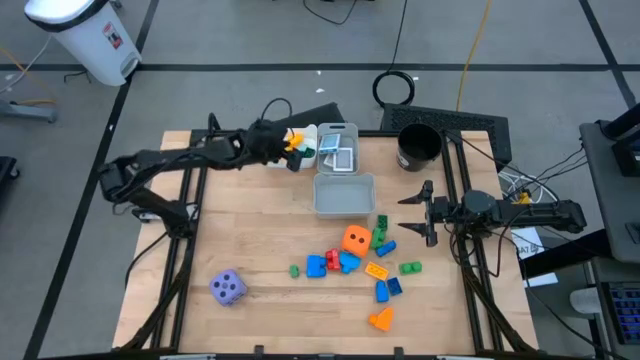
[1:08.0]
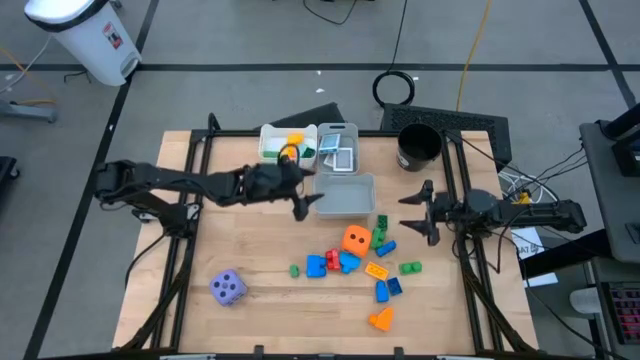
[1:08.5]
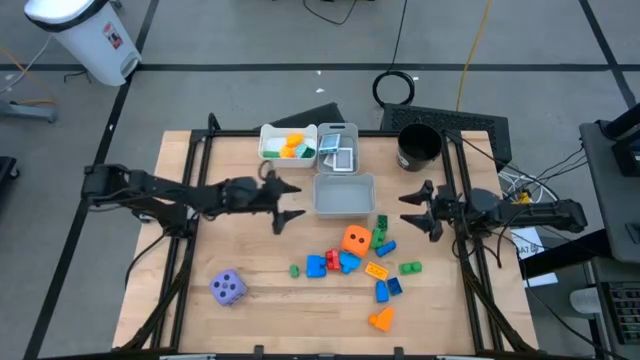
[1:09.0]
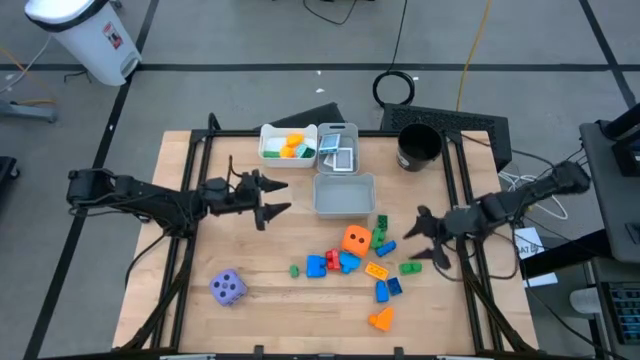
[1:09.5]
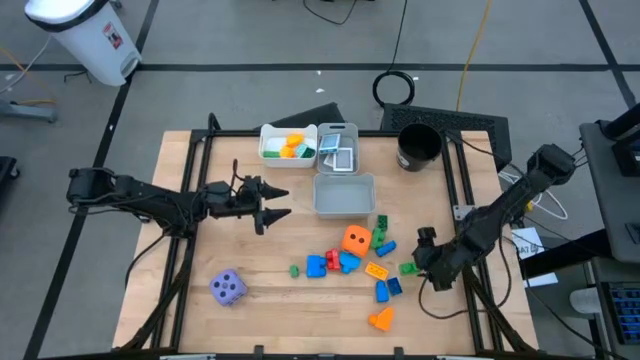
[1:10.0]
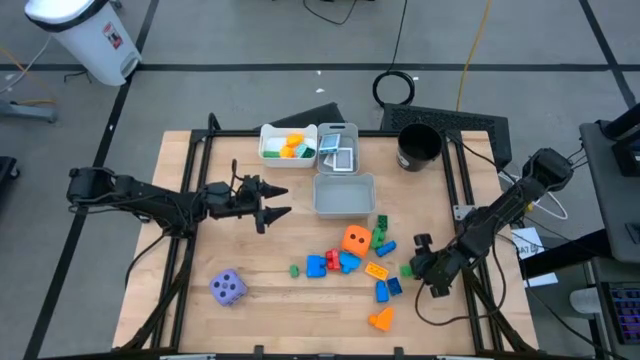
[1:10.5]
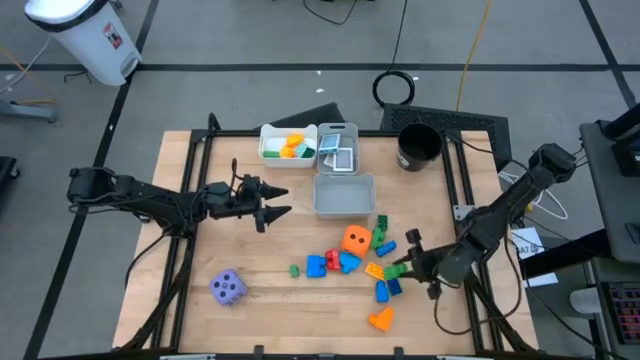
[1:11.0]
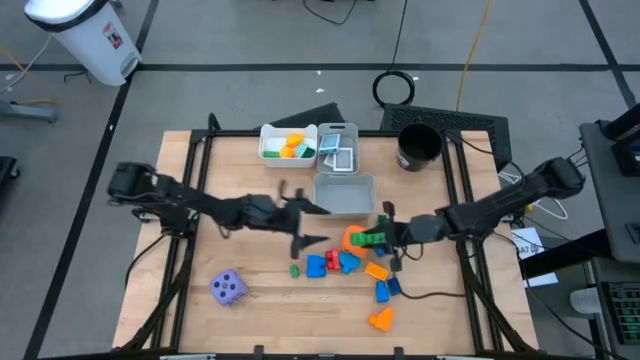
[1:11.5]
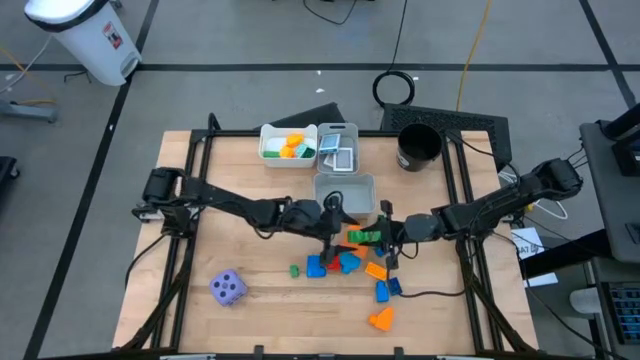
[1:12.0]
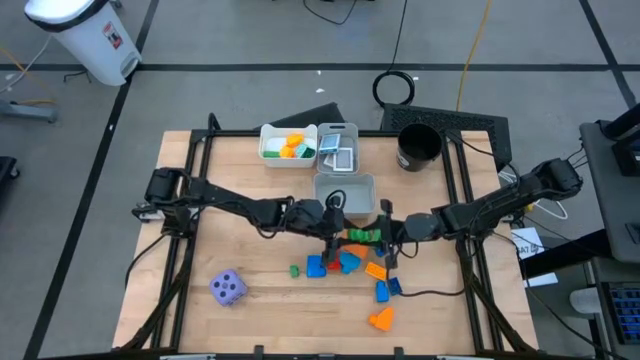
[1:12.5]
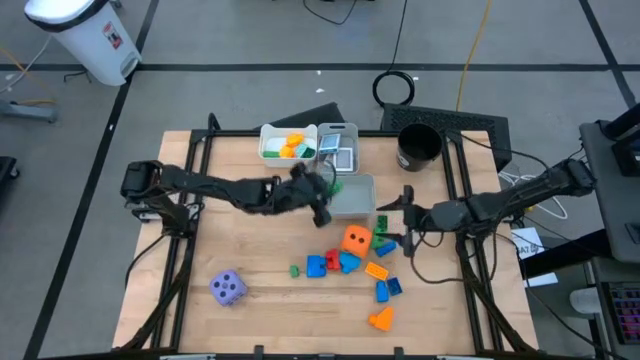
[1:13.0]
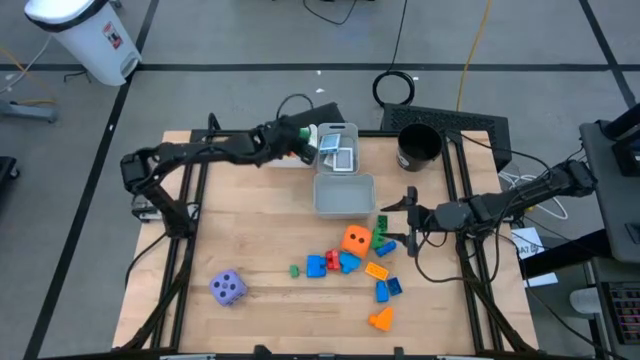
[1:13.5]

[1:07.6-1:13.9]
Task: Pick & Place Toys
Put the green game piece into the white bin

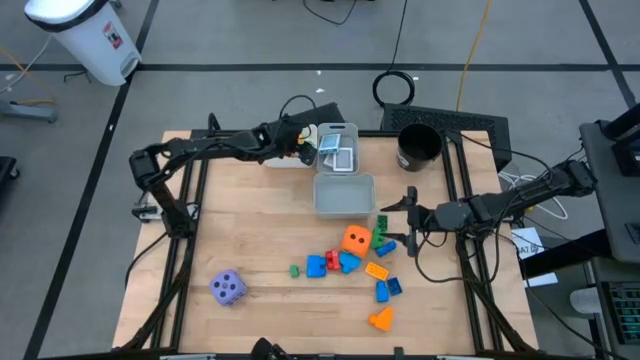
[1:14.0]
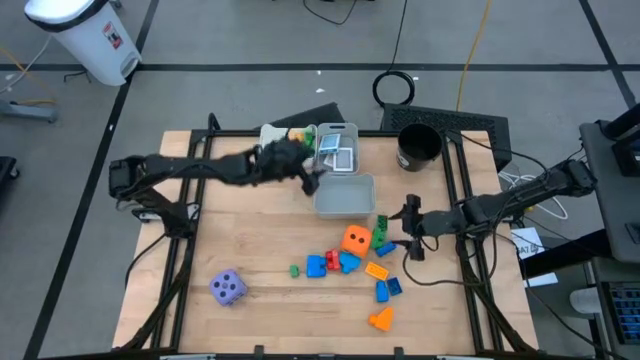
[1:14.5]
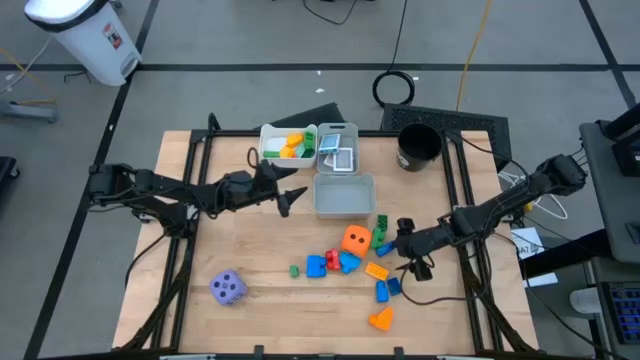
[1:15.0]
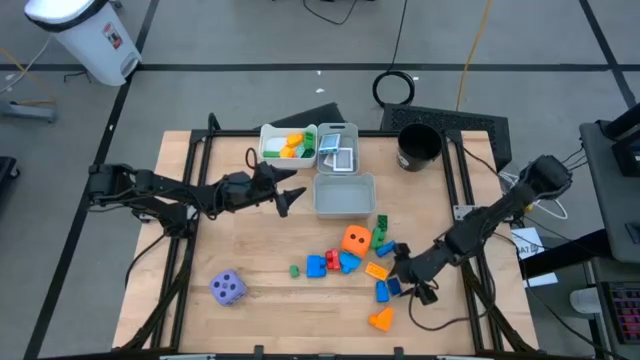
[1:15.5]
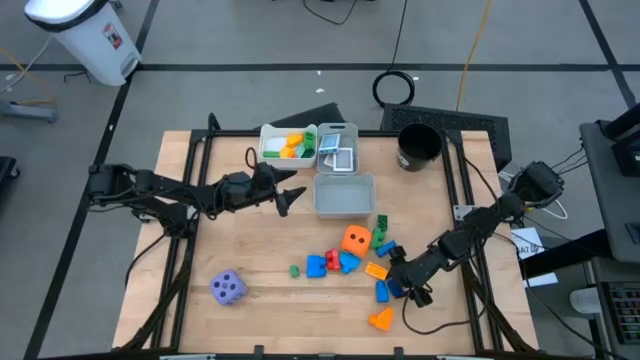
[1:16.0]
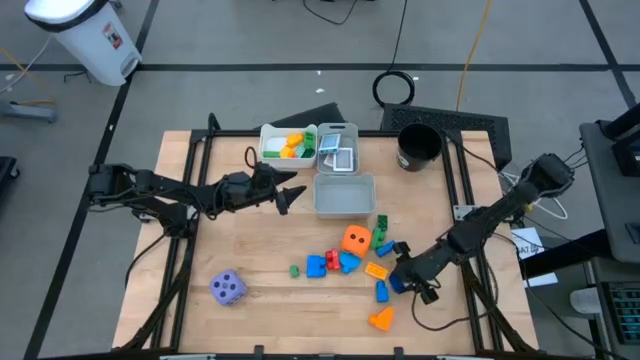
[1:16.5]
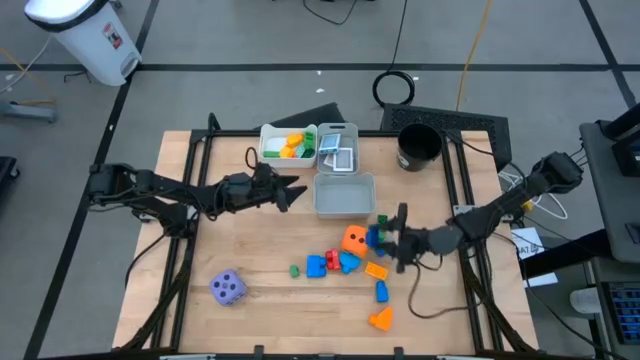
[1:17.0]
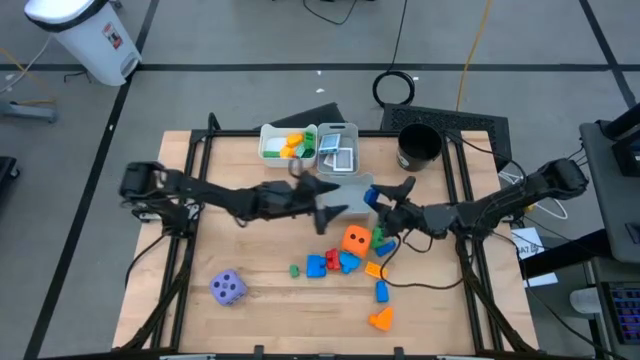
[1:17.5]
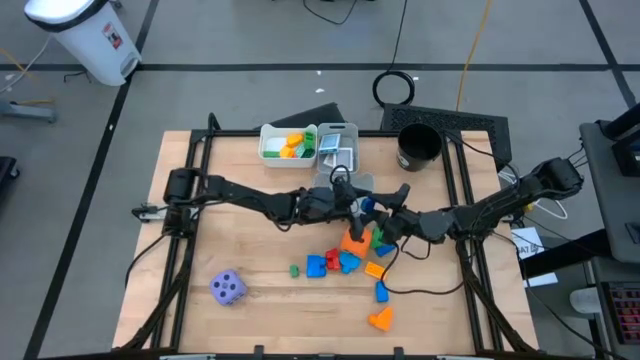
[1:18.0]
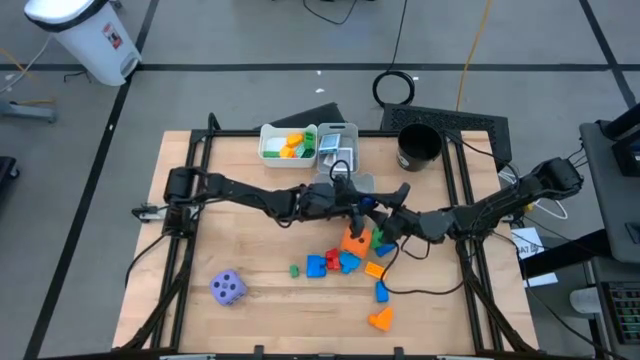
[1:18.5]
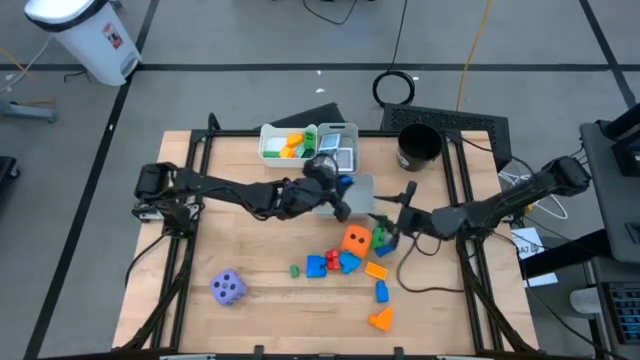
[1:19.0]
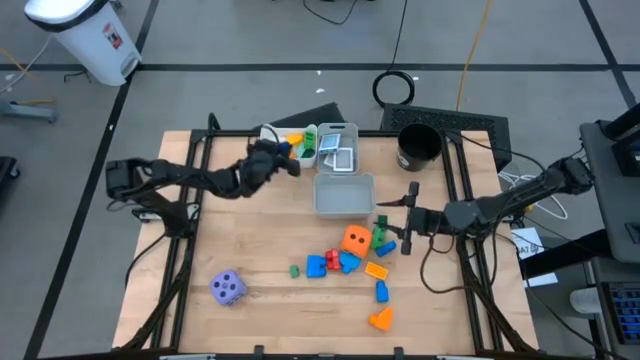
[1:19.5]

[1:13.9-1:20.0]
Put the blue game piece into the white bin

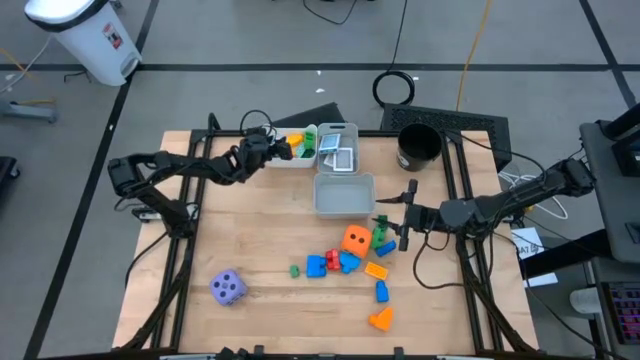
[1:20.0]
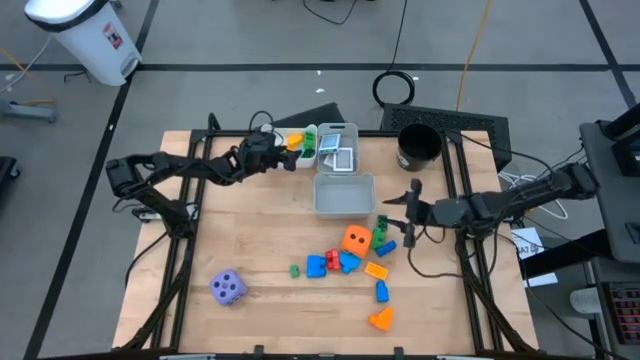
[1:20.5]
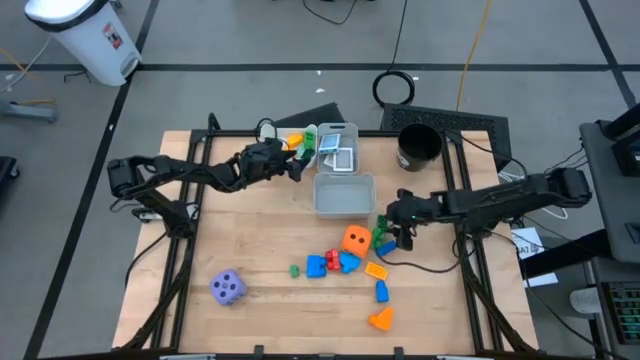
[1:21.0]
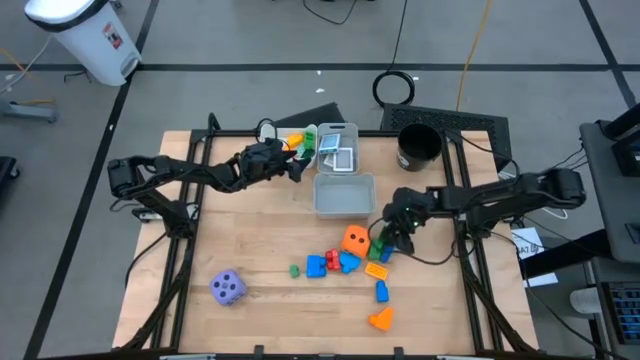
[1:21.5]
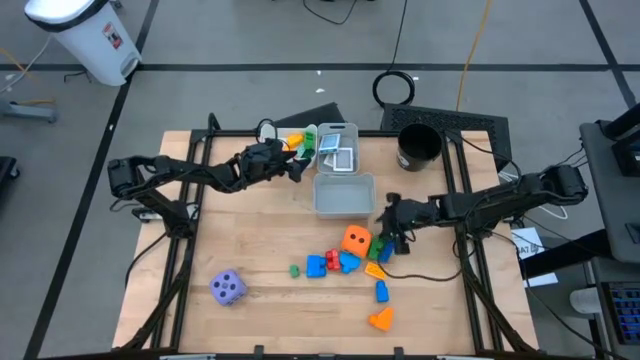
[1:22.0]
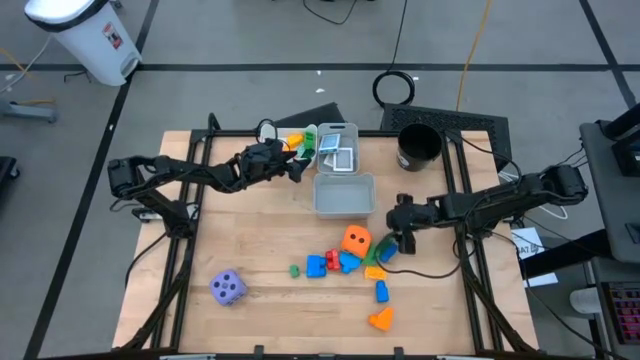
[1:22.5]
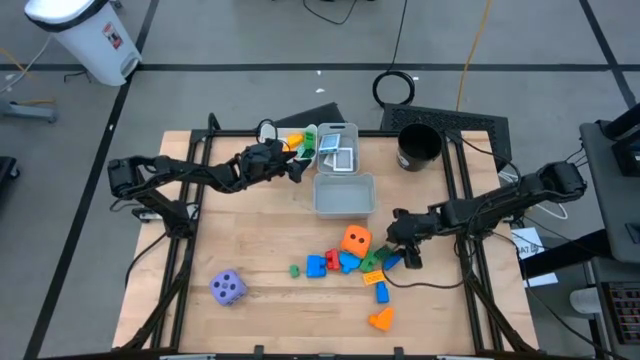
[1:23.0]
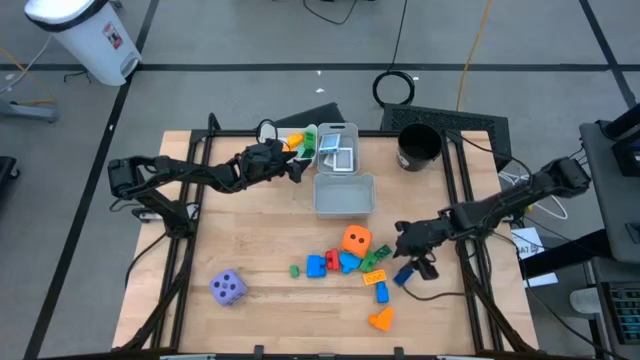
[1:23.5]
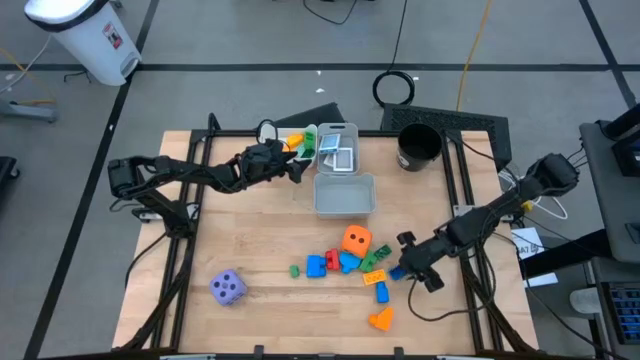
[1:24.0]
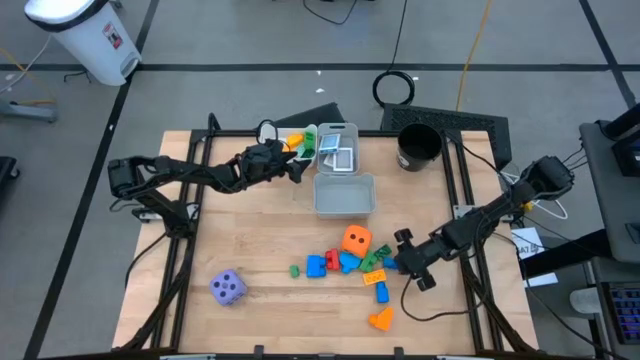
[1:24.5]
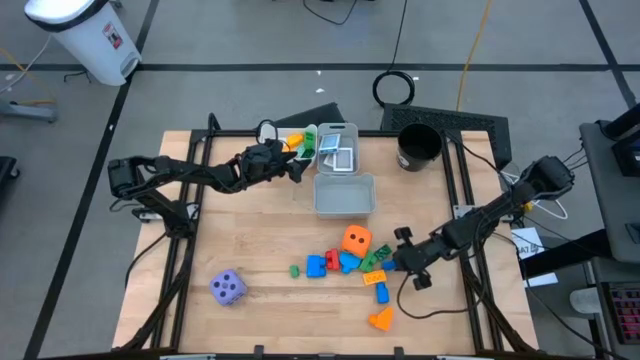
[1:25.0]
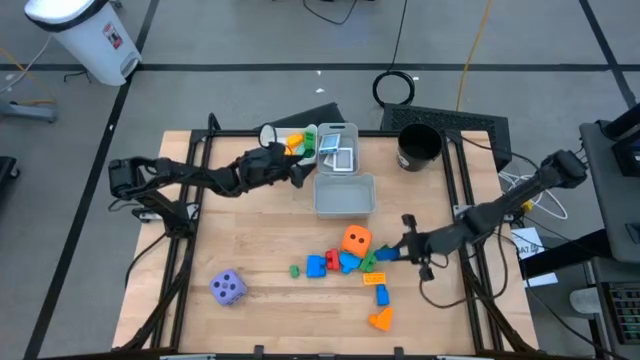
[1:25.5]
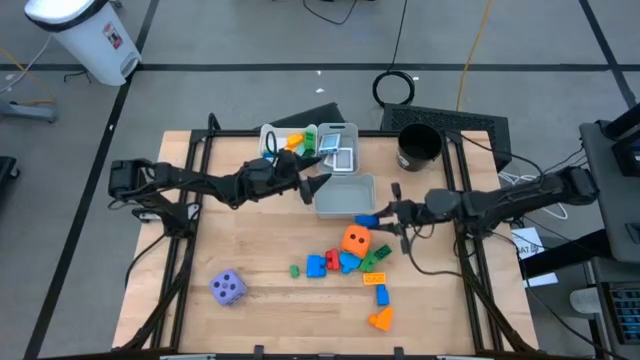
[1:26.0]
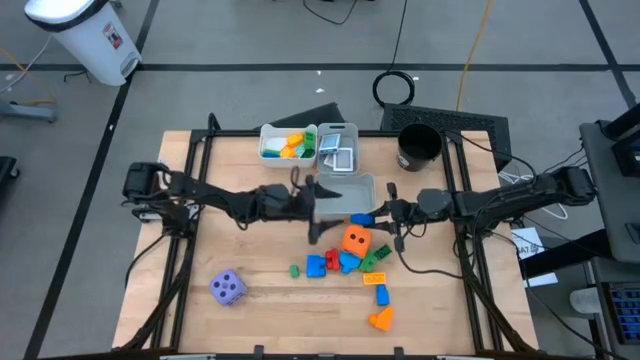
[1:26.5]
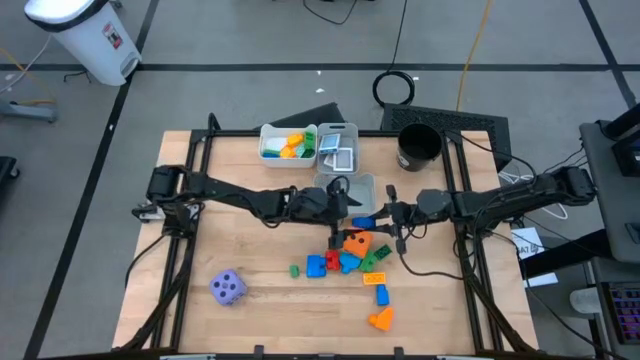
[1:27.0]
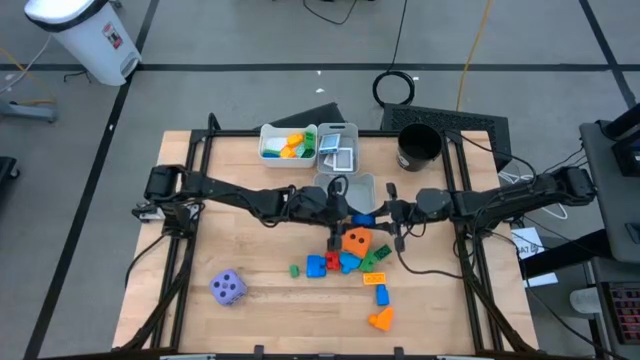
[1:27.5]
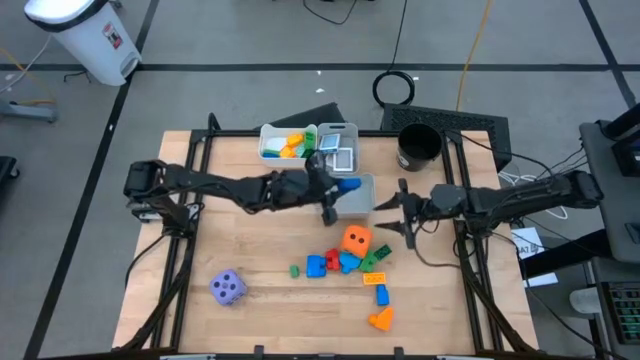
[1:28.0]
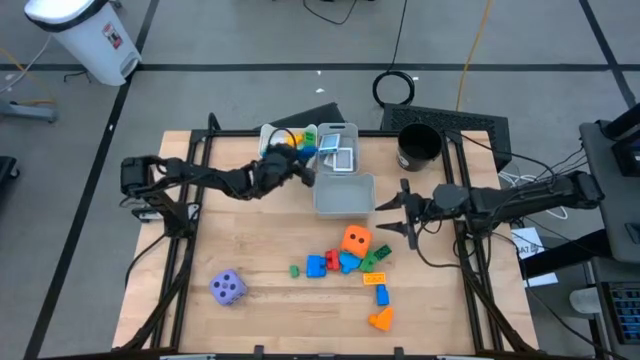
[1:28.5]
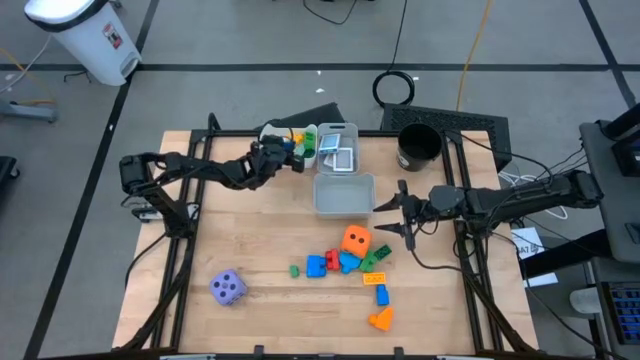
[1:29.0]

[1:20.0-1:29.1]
Put the blue game piece into the white bin
